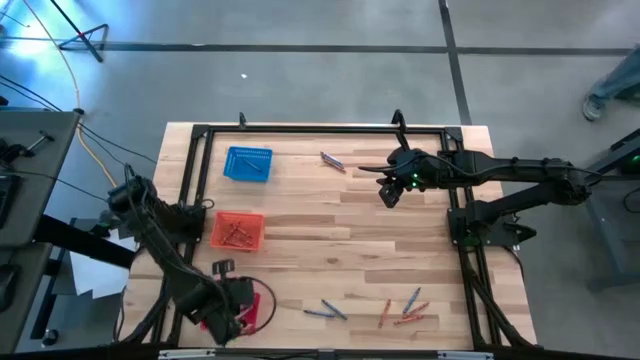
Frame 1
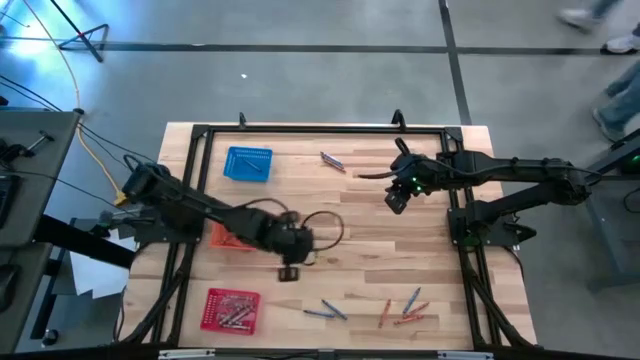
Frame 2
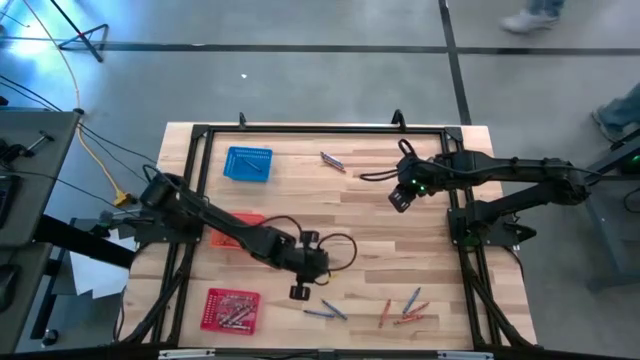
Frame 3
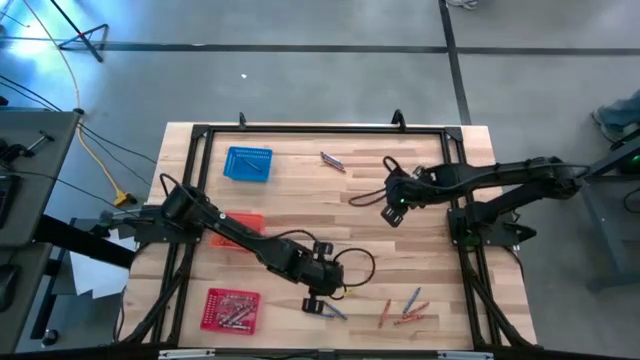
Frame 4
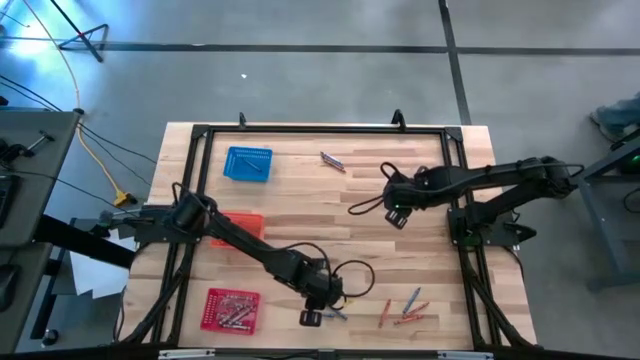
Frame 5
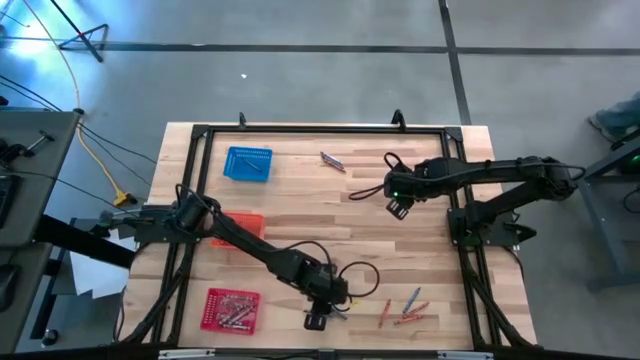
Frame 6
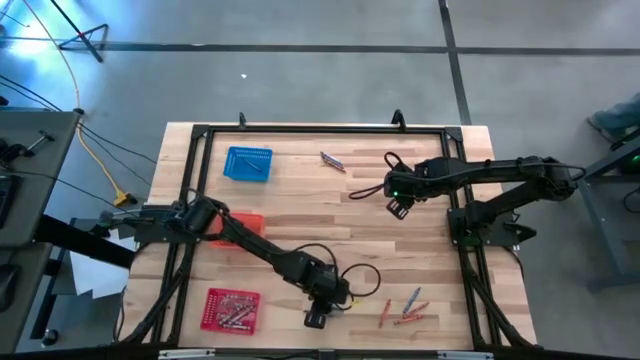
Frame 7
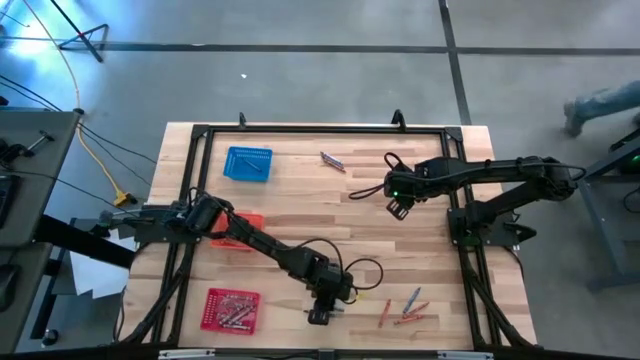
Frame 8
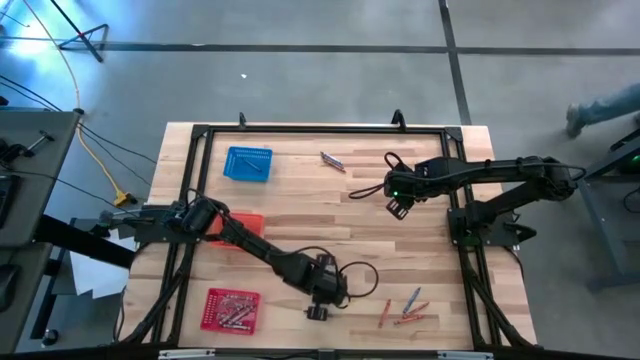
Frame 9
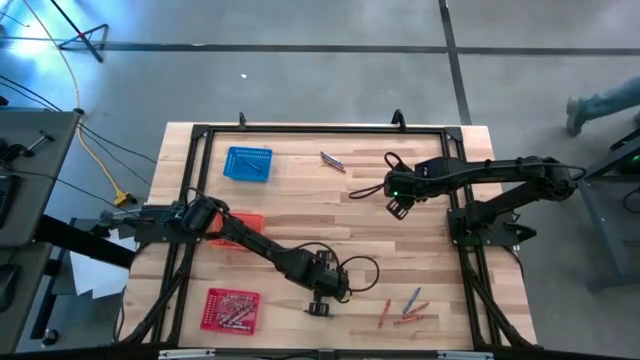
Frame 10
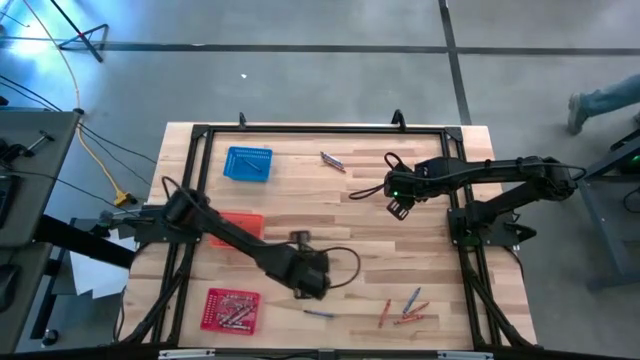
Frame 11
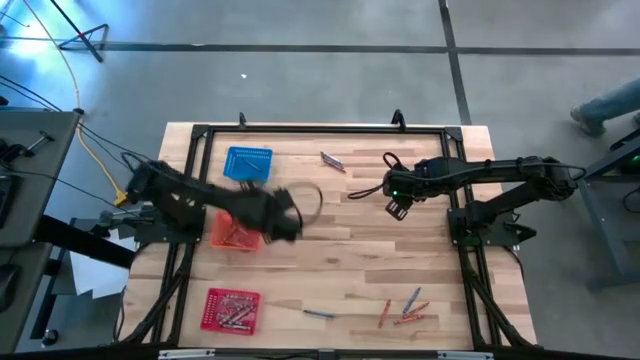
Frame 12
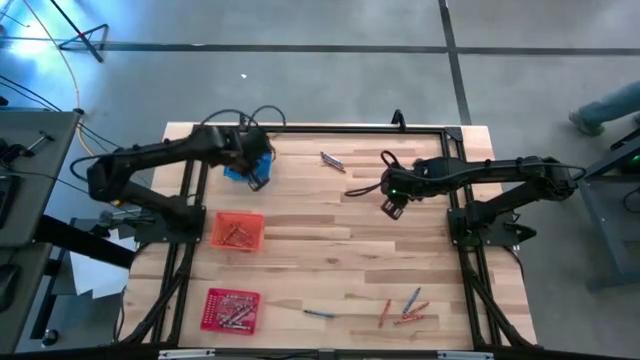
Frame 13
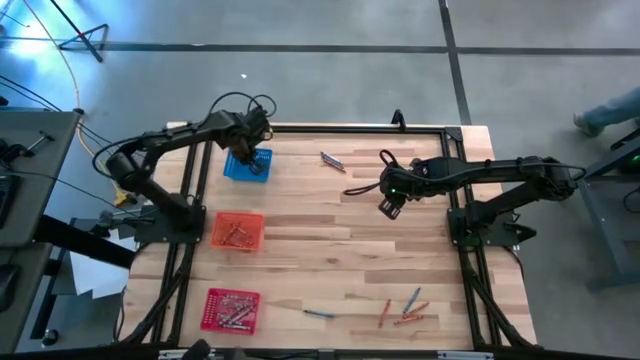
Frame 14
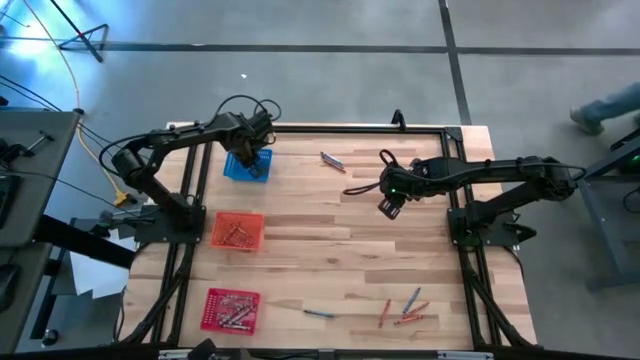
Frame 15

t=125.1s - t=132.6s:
Task: Sort crayons
Put the blue crayon into the blue bin

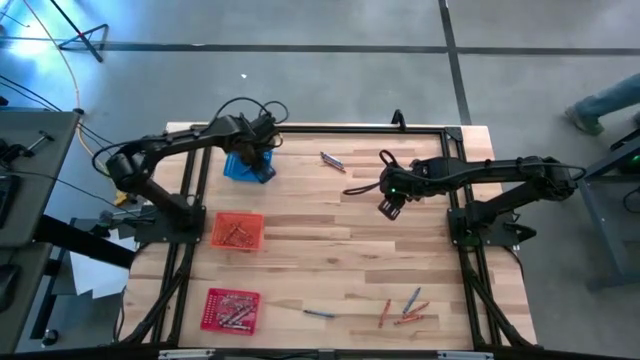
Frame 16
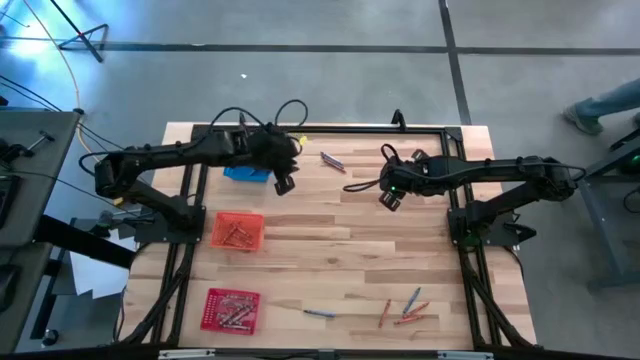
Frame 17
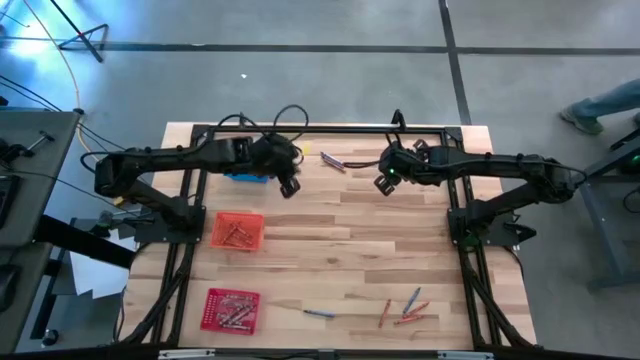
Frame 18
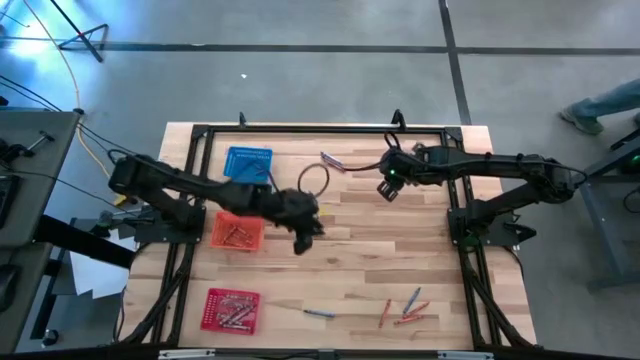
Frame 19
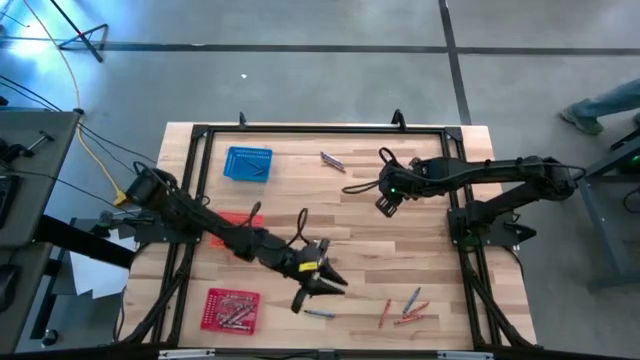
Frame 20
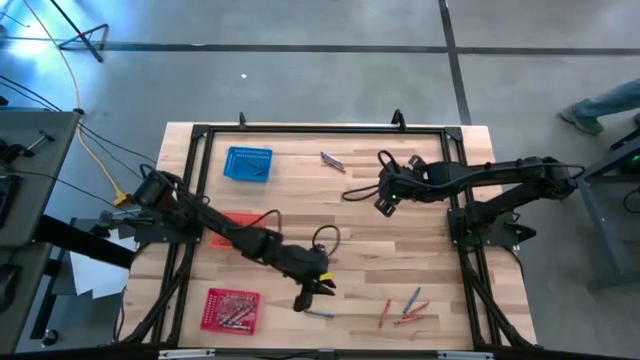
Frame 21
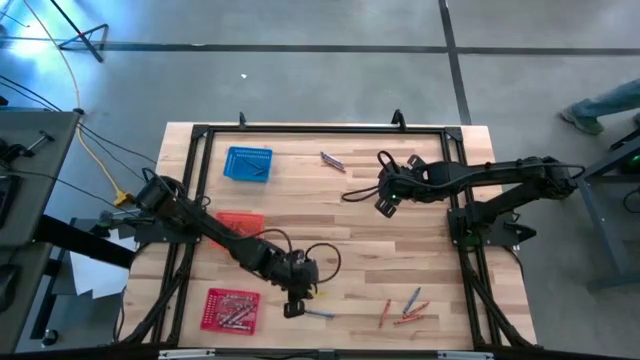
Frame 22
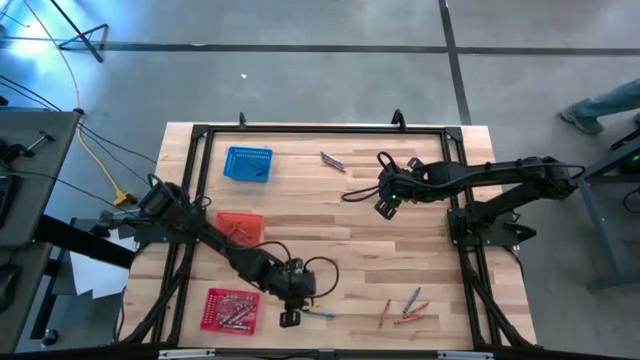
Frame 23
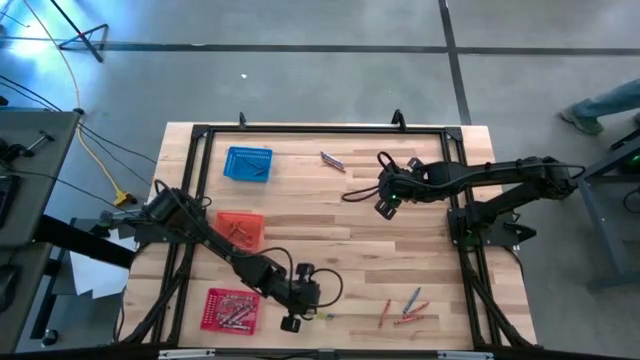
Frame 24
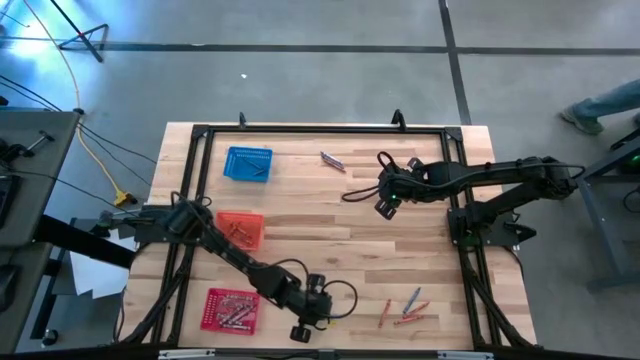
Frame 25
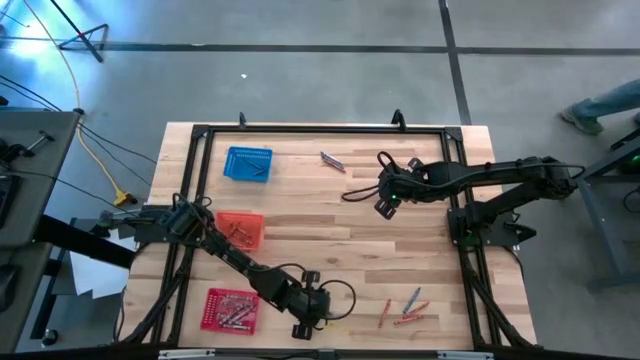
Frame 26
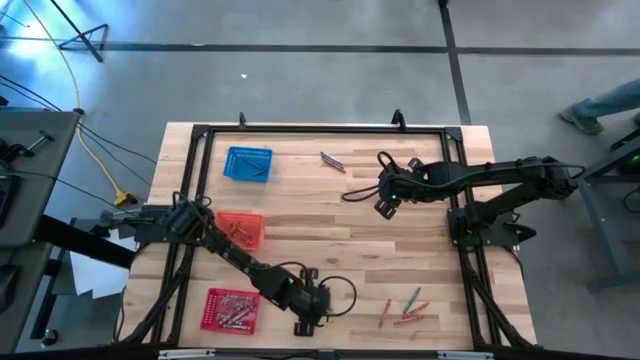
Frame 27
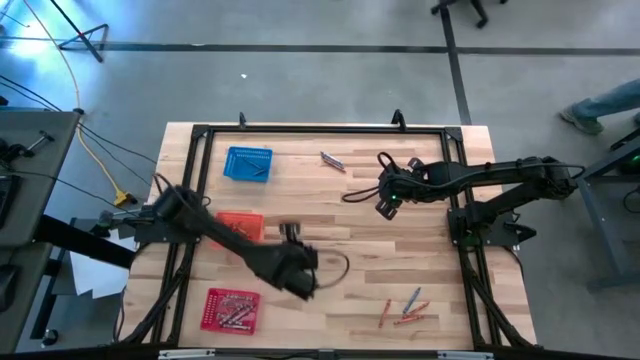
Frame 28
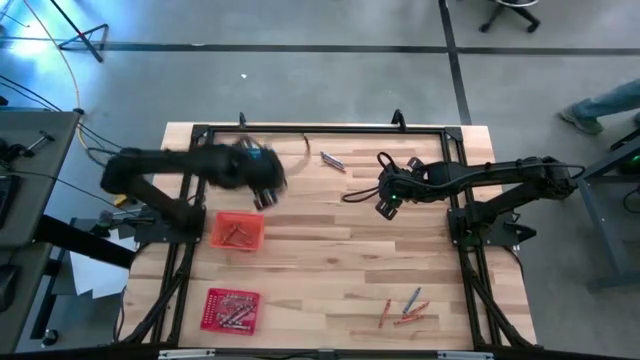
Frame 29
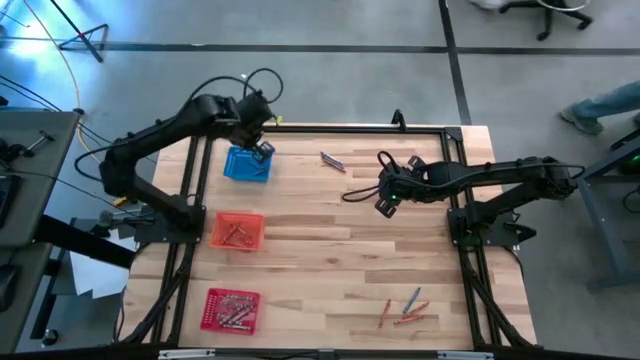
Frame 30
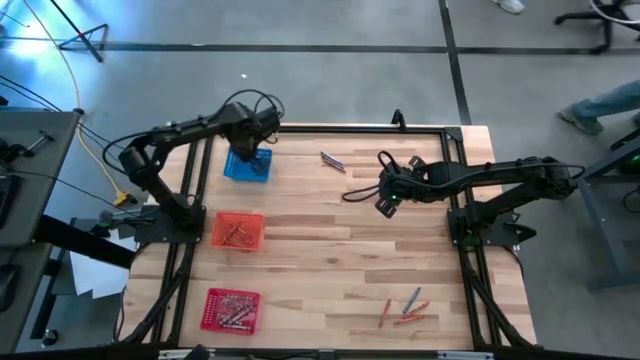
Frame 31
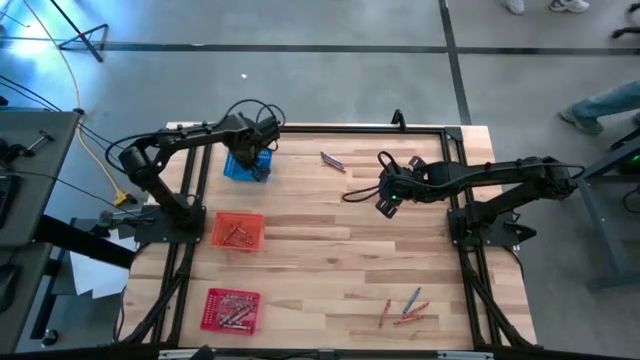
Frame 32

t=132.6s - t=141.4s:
Put the blue crayon into the blue bin

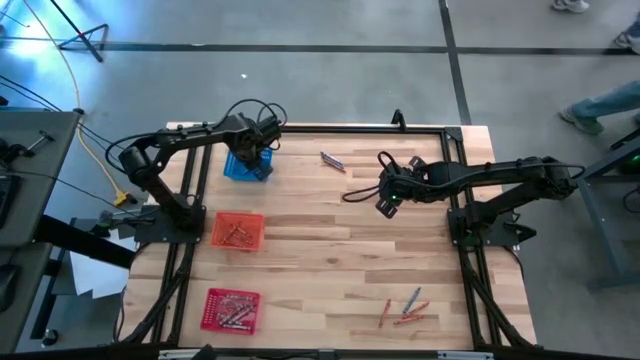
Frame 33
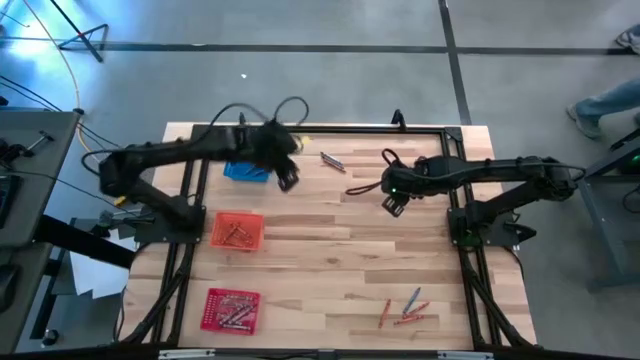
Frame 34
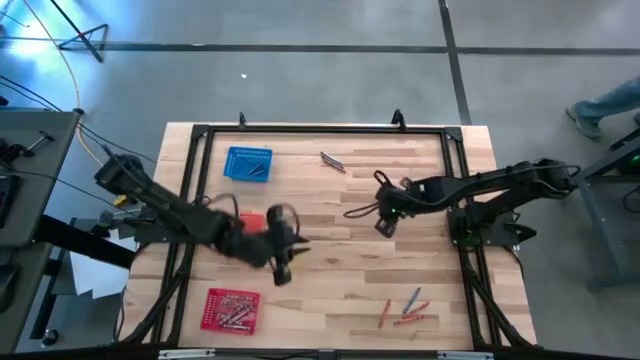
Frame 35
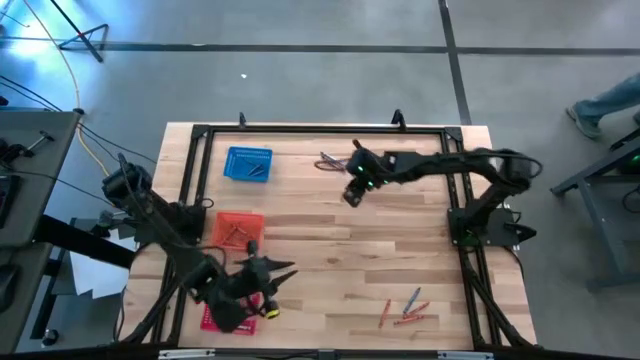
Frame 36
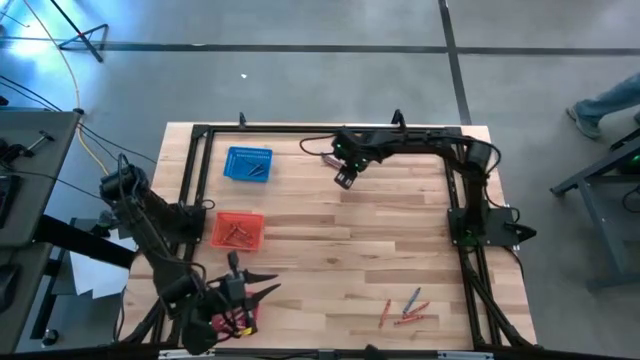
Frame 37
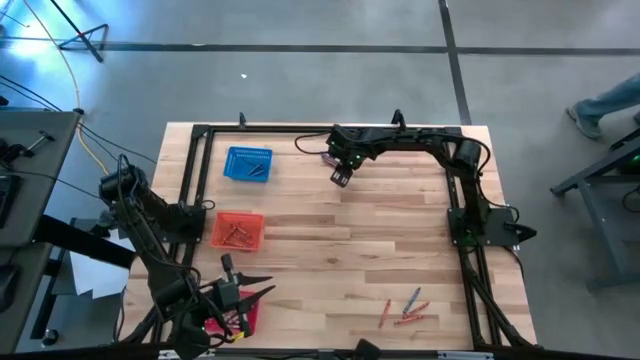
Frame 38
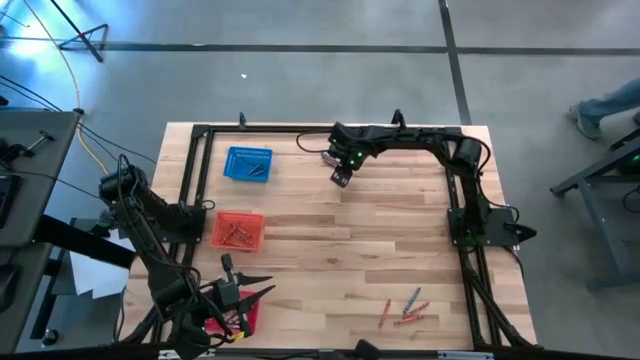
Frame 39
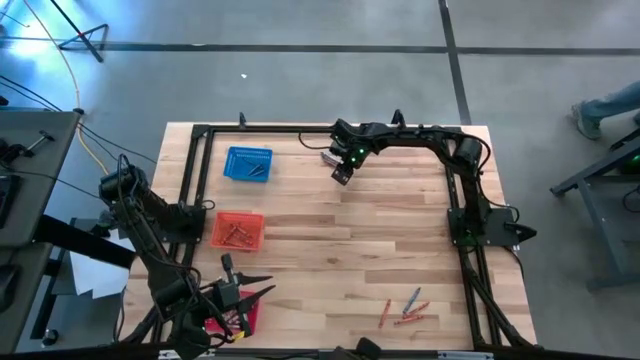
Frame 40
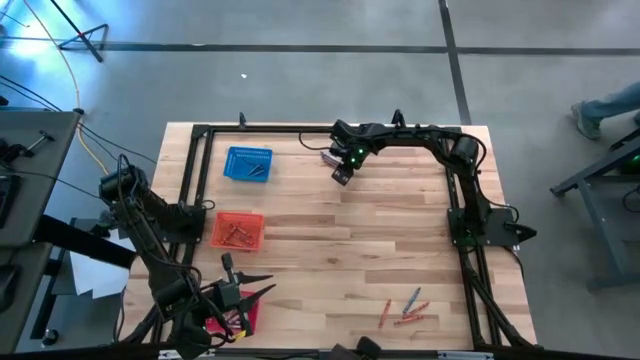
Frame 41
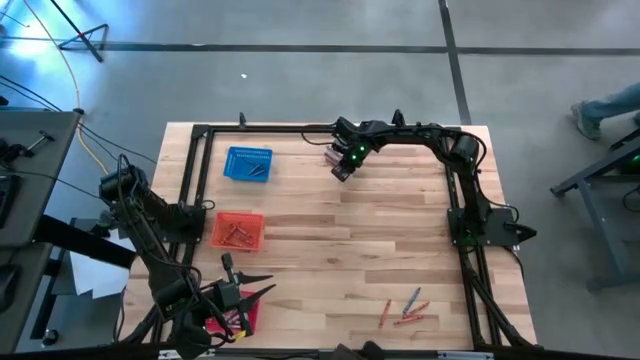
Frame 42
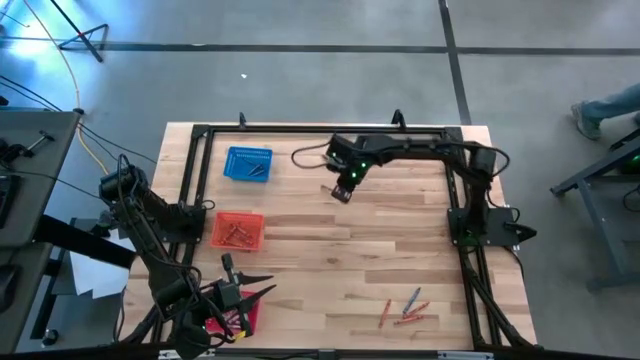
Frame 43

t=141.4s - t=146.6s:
Put the orange crayon into the orange bin
